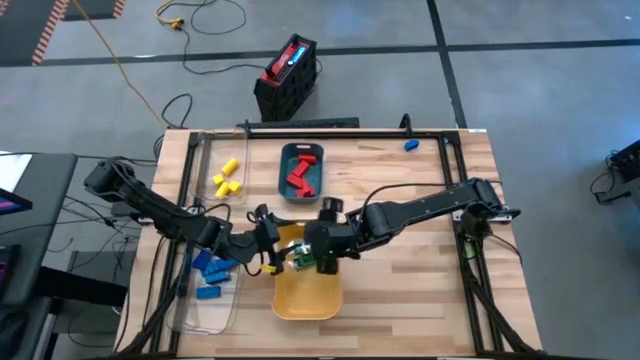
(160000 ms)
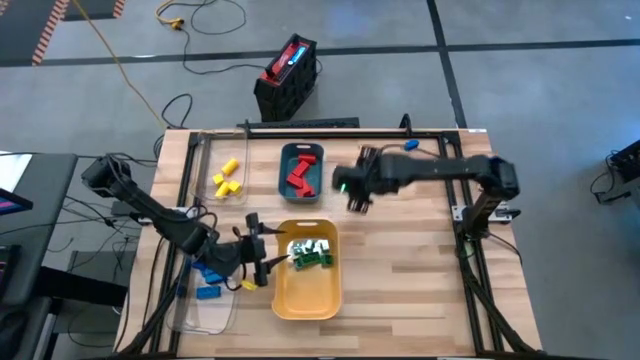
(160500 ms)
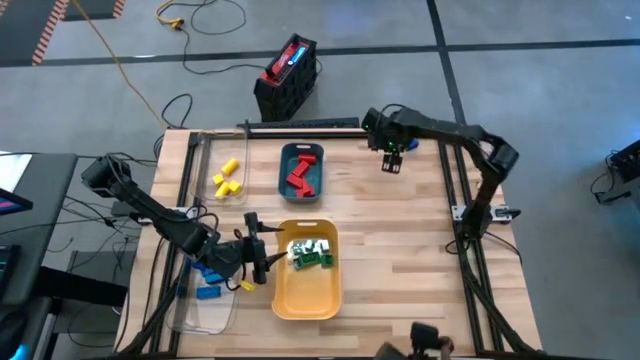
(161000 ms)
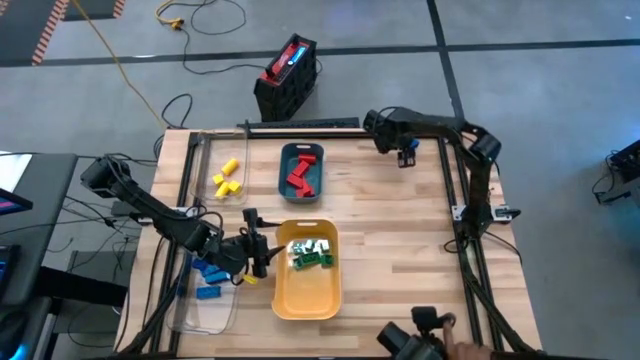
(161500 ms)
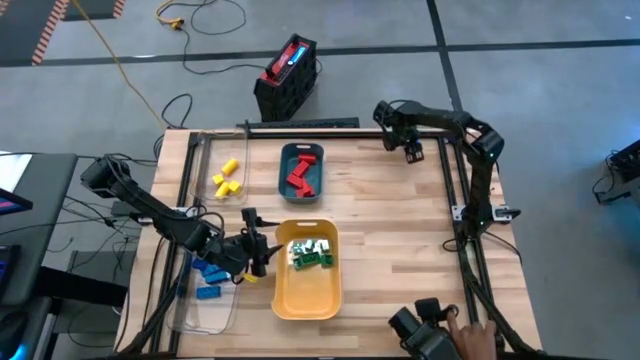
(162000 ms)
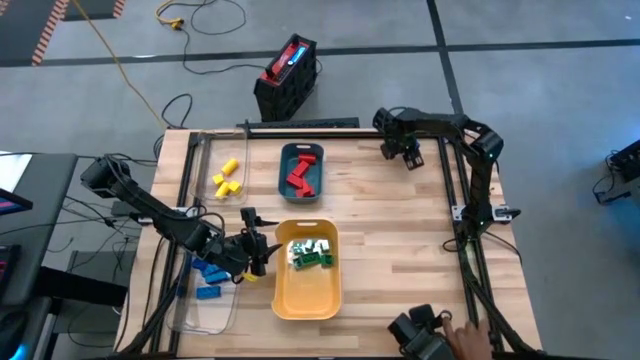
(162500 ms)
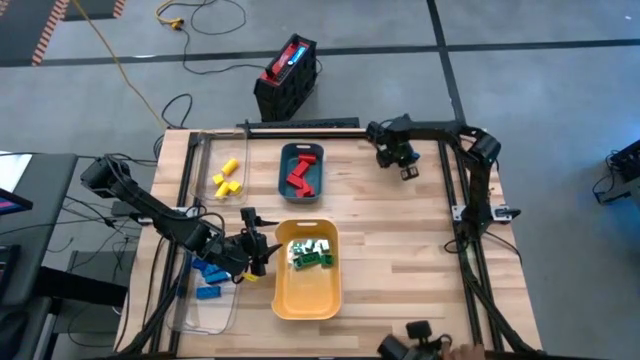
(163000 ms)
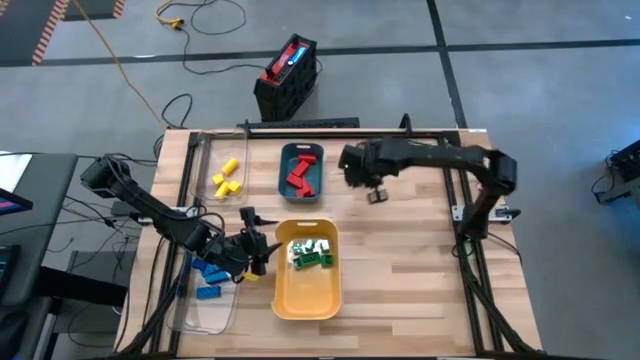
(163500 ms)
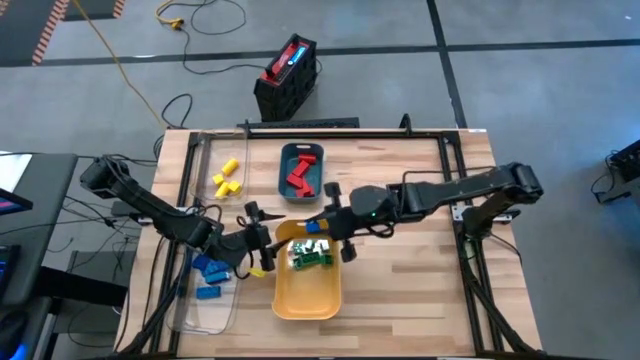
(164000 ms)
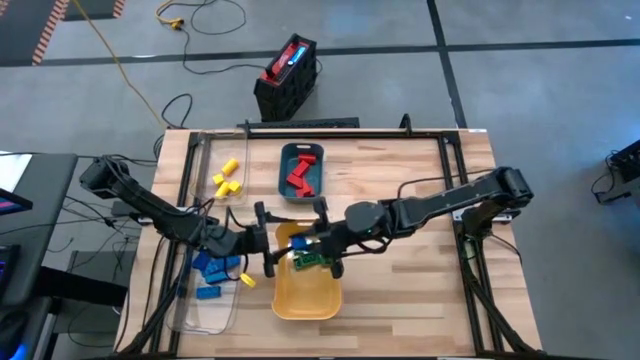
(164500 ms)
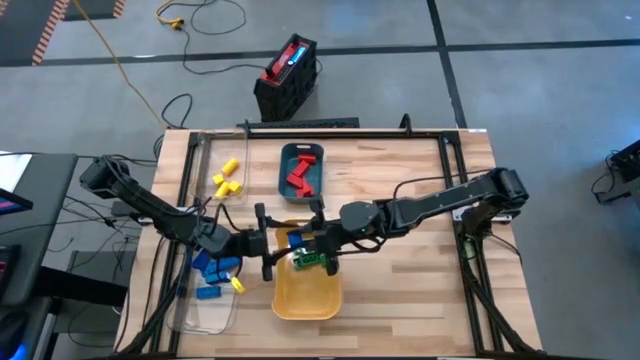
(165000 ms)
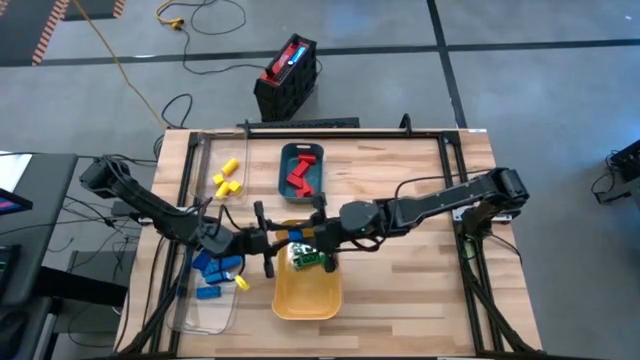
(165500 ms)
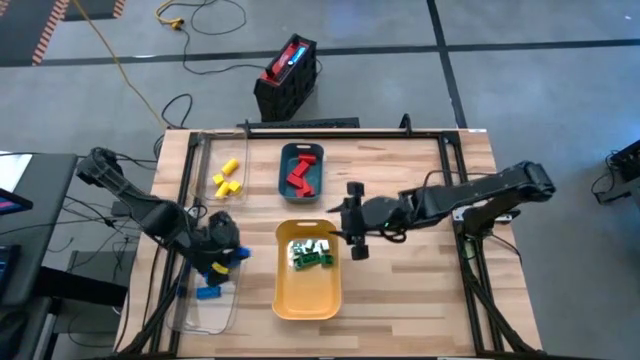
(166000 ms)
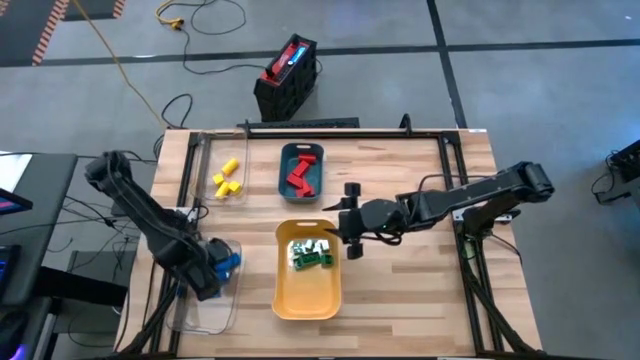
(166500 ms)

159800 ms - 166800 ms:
Task: Sort blocks
Put the rectangular blue game piece into the bottom transparent bin

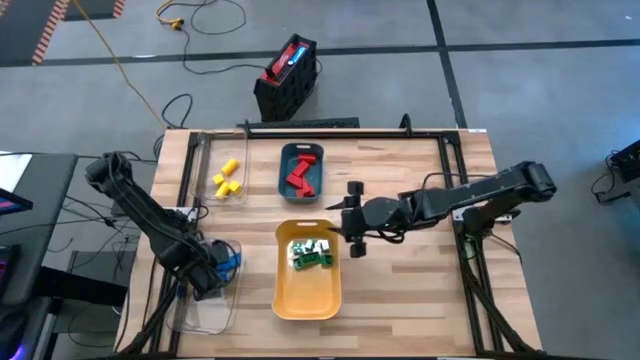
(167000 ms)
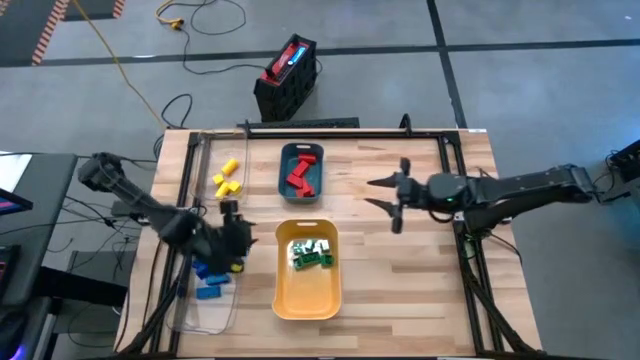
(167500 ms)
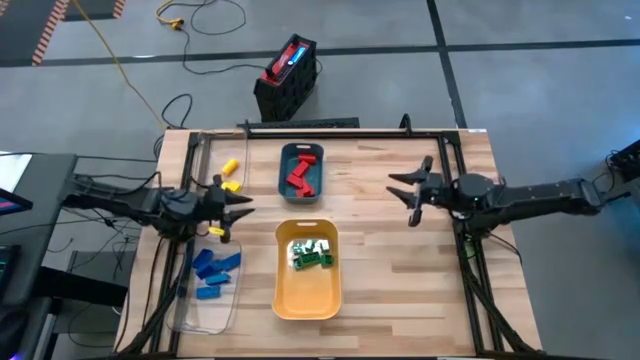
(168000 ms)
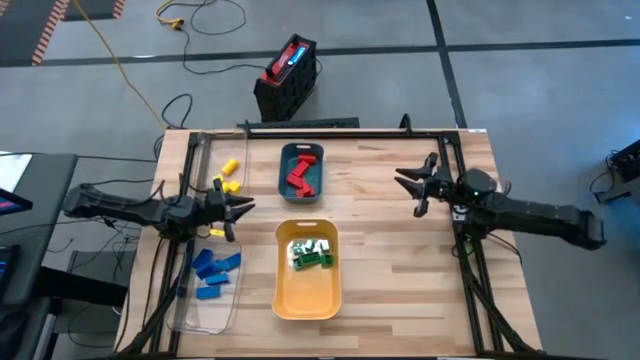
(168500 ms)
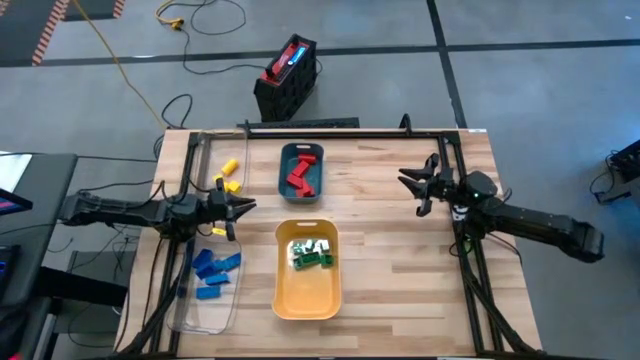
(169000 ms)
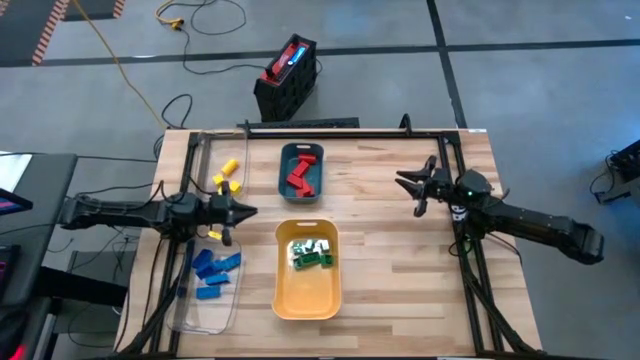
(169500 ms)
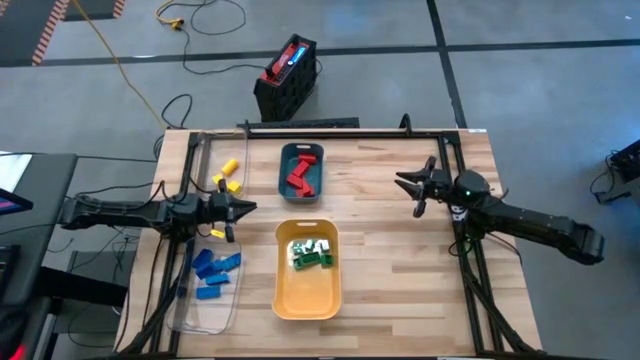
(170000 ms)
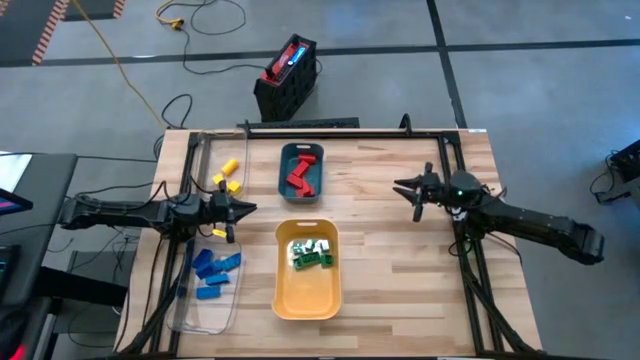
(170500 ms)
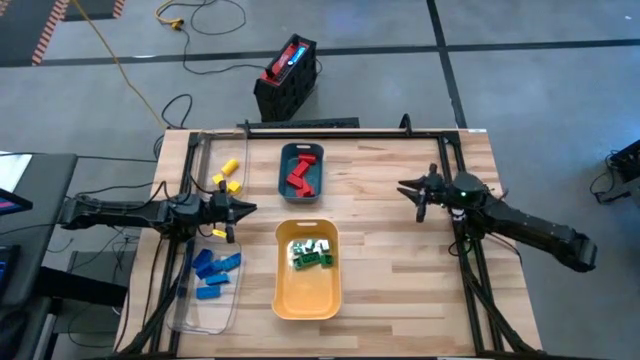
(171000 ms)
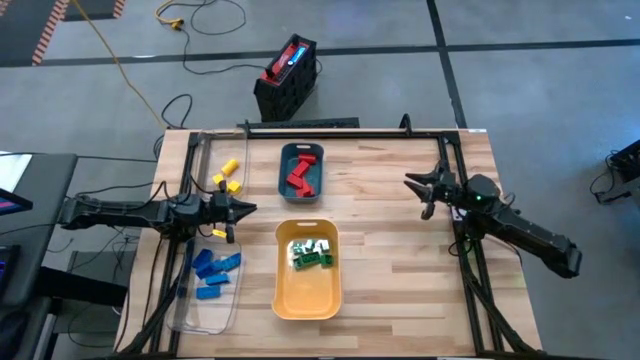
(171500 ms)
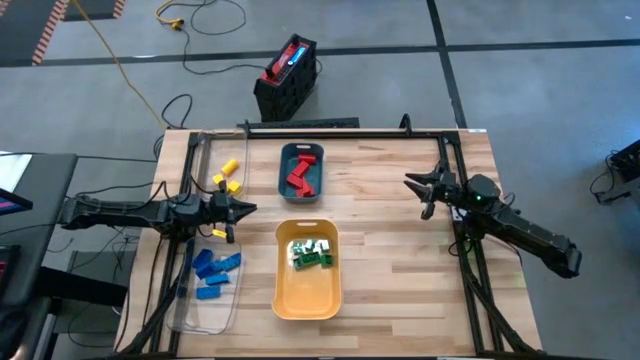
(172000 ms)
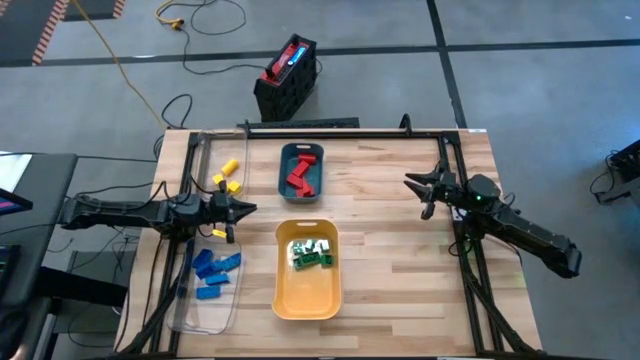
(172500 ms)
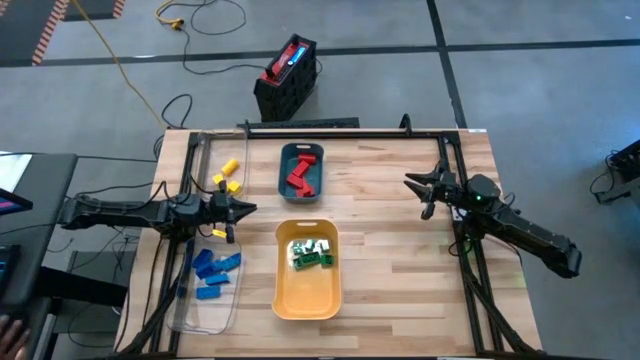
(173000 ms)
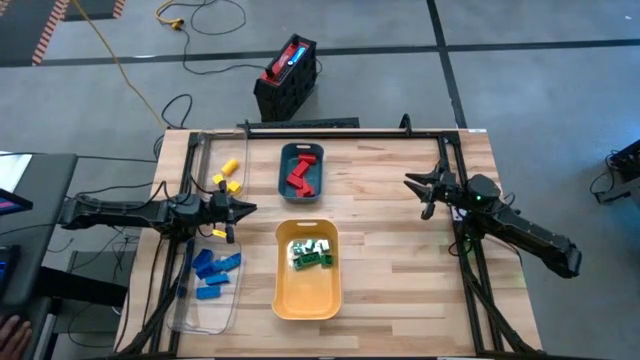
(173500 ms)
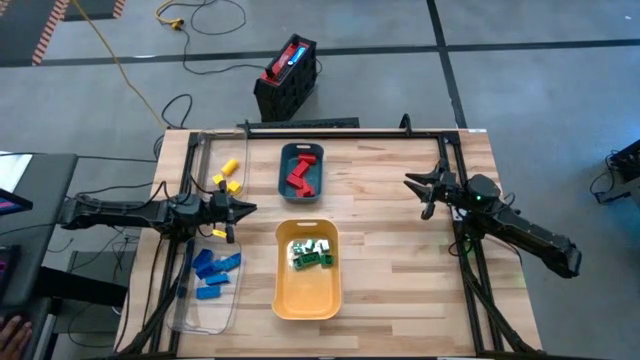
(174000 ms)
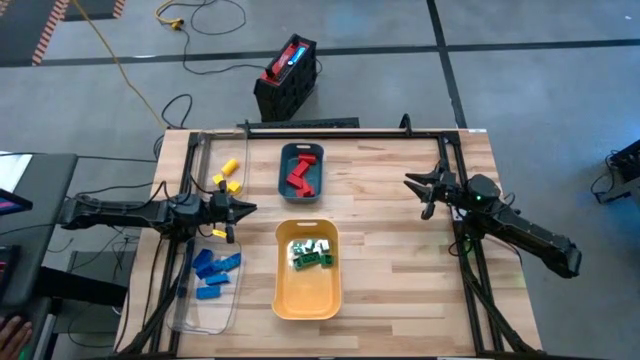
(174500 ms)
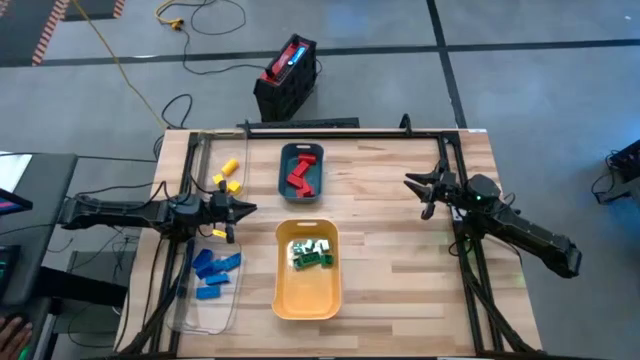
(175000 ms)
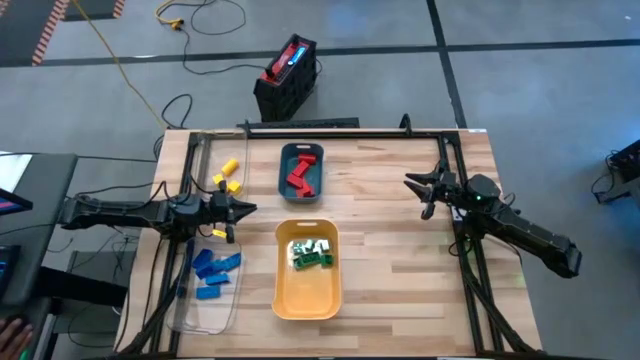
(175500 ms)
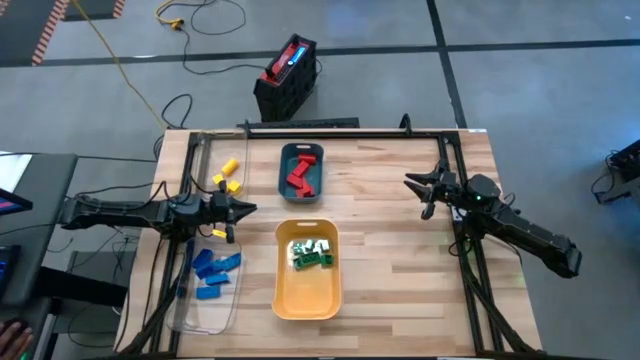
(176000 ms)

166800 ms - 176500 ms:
Return to Home Position

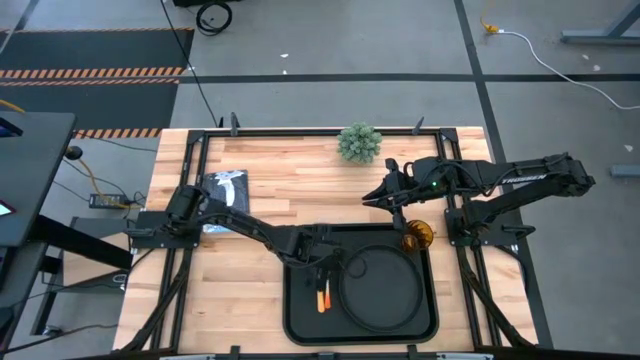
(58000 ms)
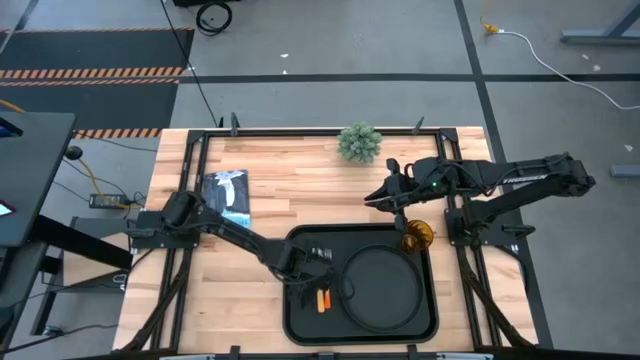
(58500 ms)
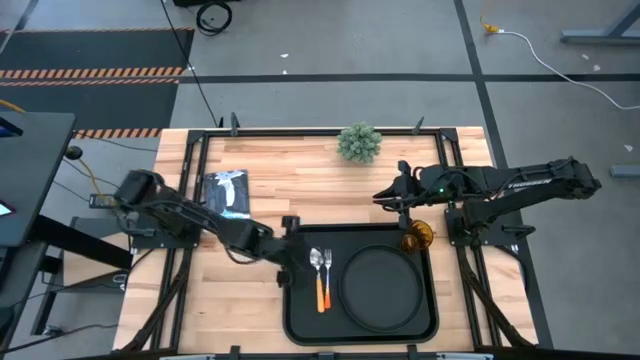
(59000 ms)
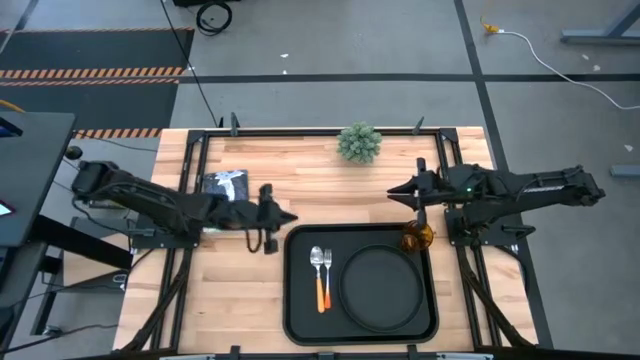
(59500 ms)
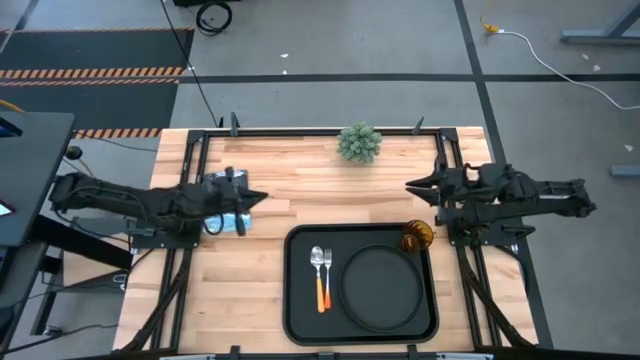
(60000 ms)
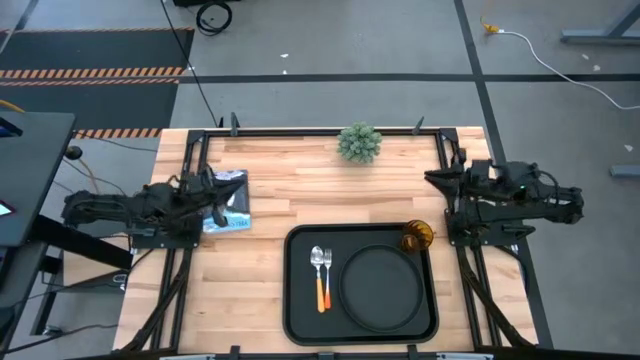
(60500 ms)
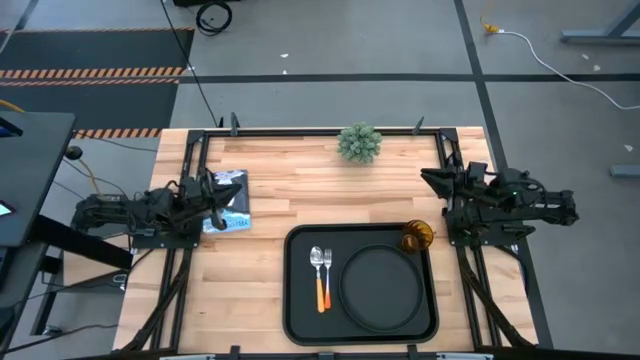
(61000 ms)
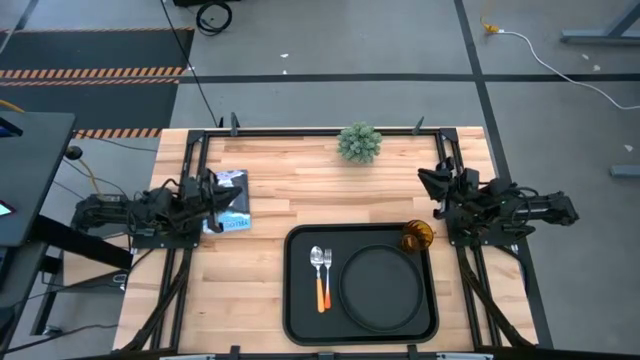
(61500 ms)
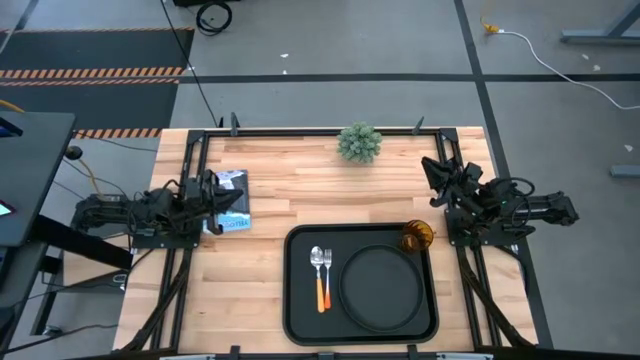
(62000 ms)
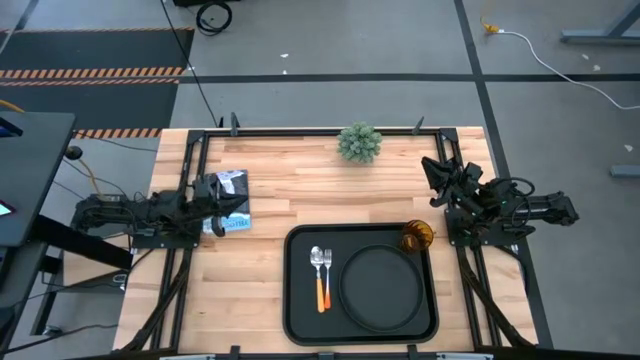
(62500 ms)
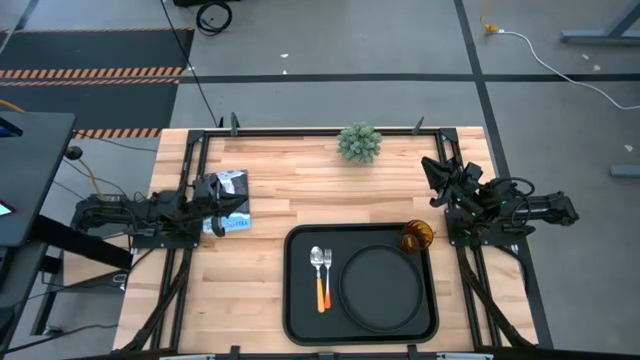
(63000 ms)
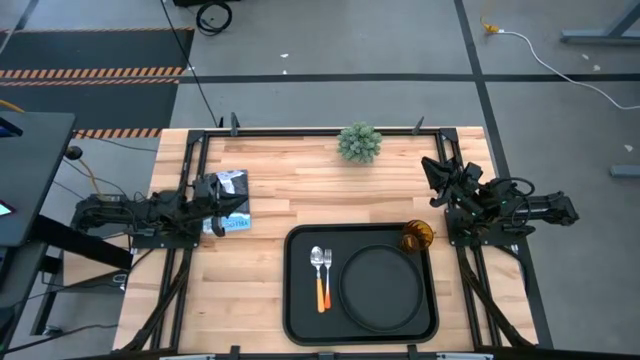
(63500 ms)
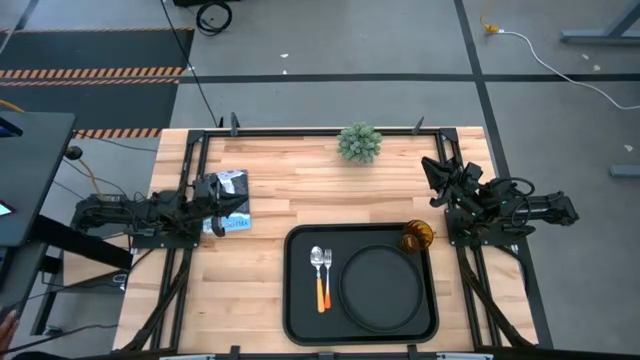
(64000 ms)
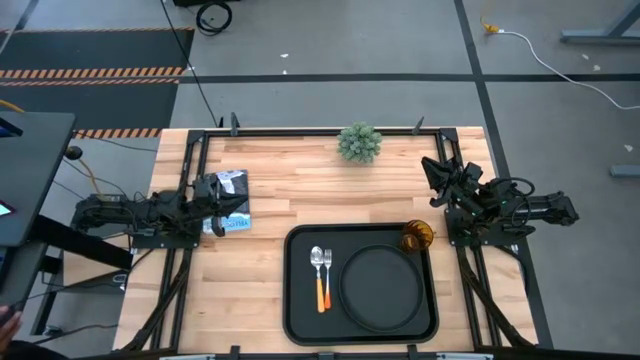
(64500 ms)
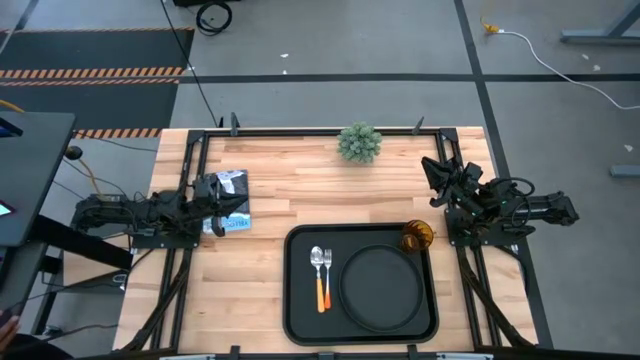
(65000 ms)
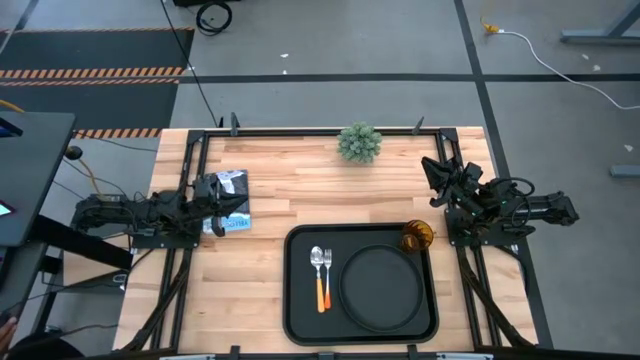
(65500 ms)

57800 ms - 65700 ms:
Task: Pick and place plate/cup/fork/spoon on tray
Return to Home Position
